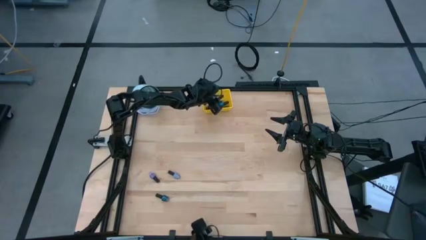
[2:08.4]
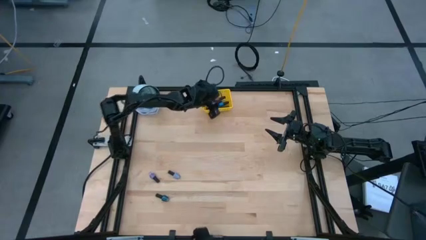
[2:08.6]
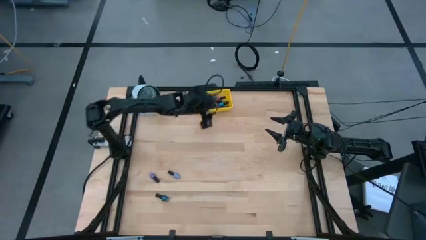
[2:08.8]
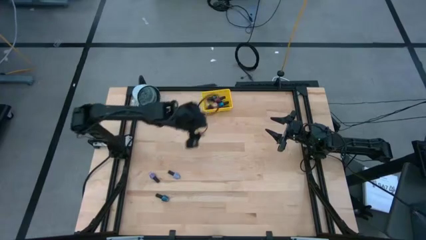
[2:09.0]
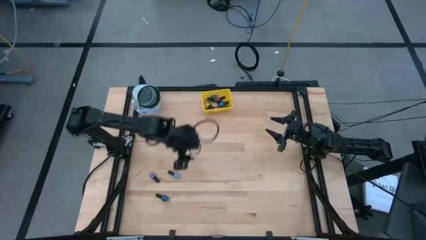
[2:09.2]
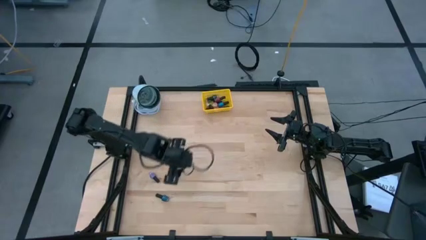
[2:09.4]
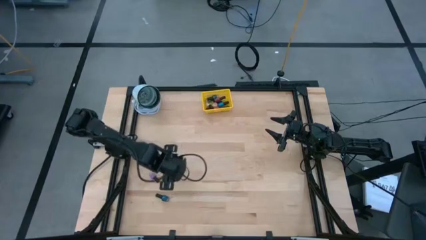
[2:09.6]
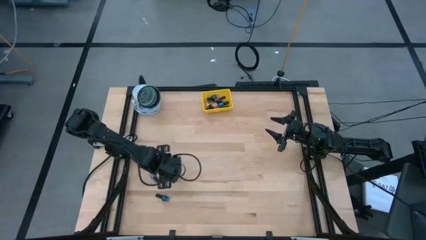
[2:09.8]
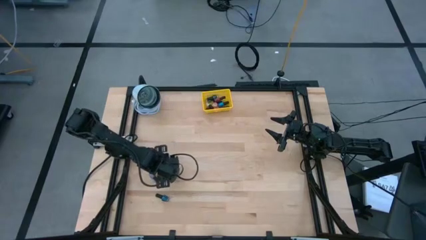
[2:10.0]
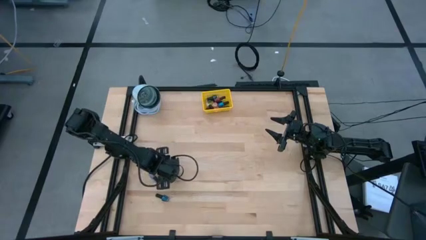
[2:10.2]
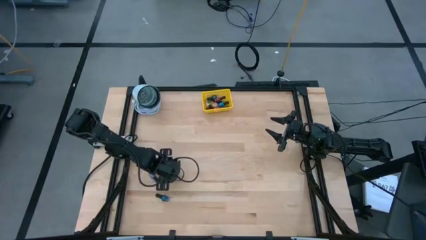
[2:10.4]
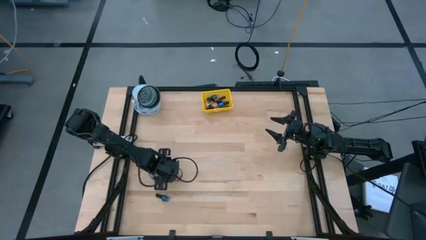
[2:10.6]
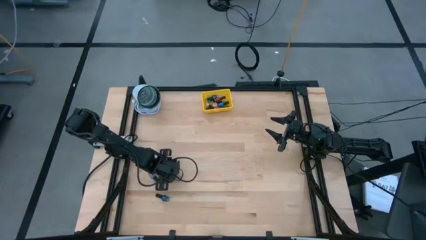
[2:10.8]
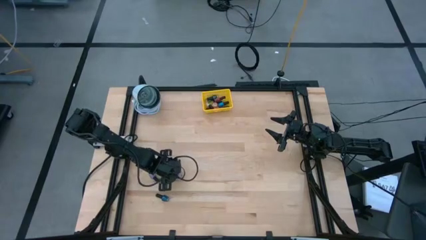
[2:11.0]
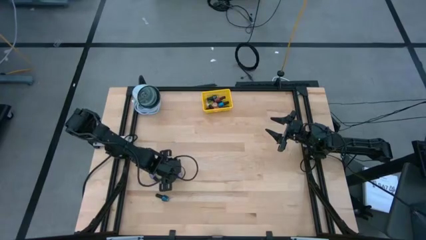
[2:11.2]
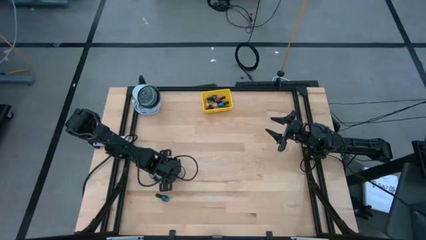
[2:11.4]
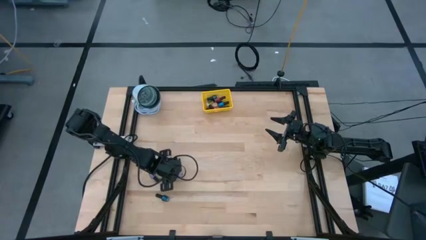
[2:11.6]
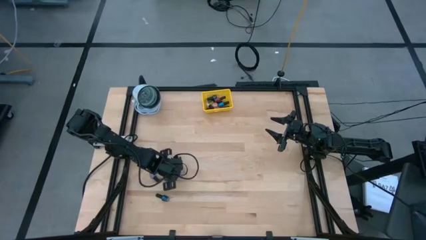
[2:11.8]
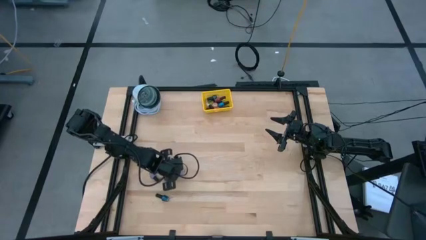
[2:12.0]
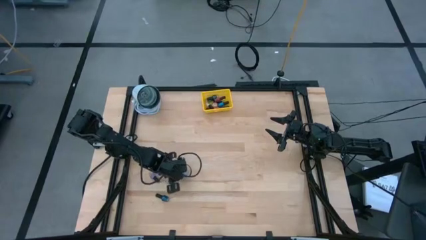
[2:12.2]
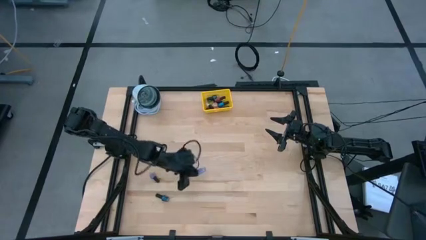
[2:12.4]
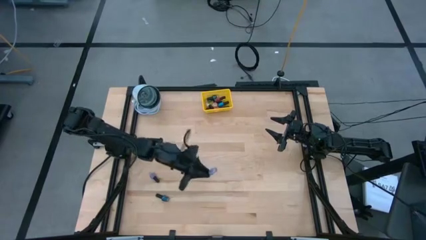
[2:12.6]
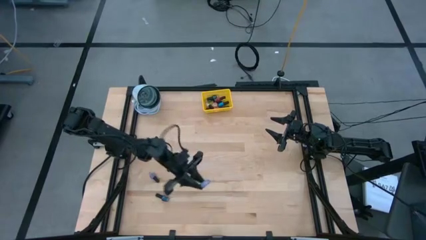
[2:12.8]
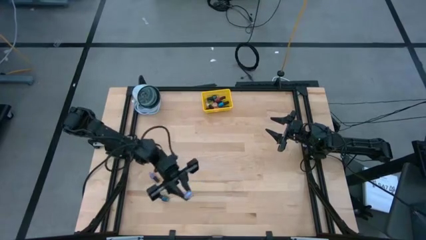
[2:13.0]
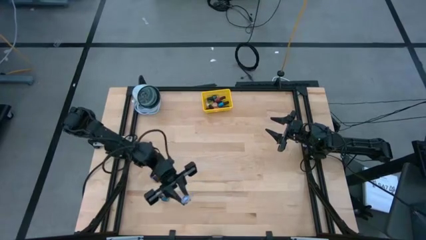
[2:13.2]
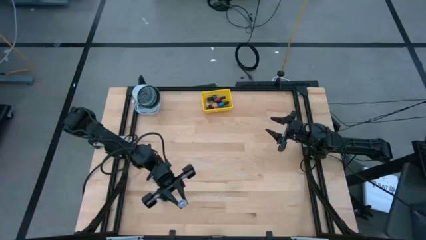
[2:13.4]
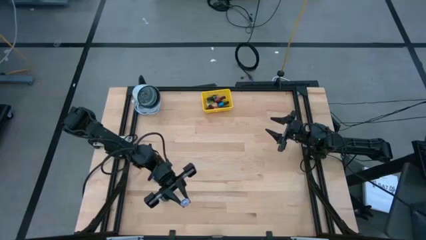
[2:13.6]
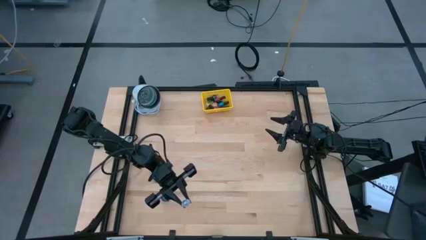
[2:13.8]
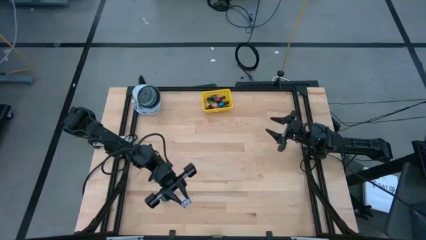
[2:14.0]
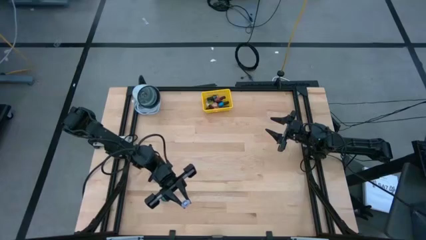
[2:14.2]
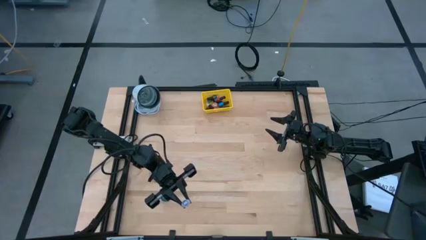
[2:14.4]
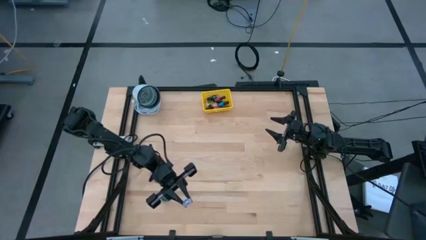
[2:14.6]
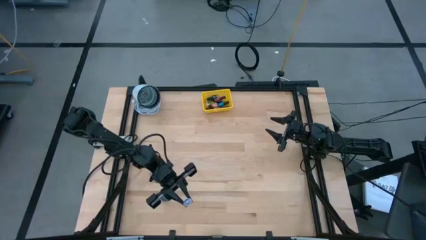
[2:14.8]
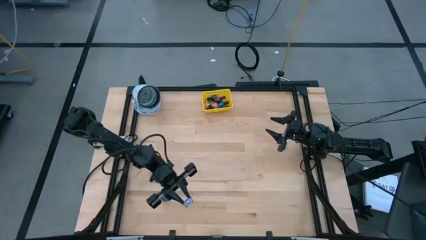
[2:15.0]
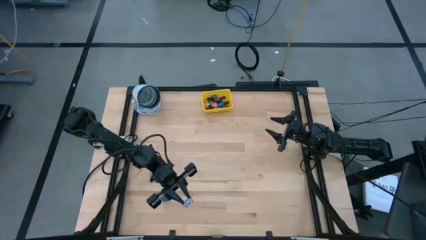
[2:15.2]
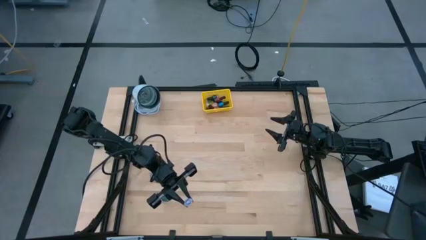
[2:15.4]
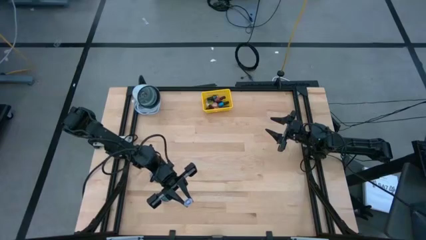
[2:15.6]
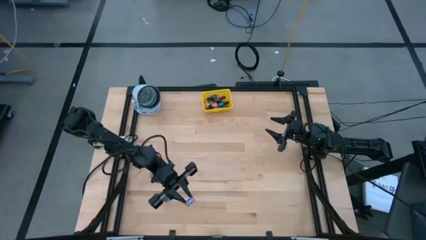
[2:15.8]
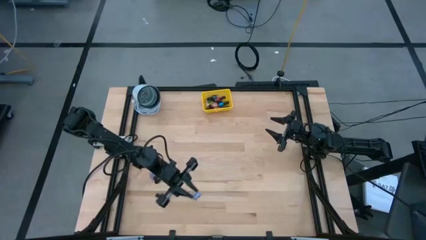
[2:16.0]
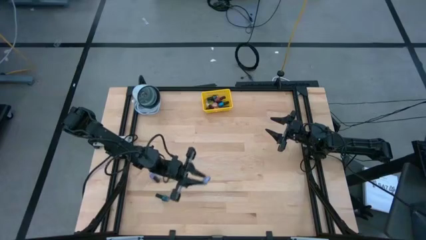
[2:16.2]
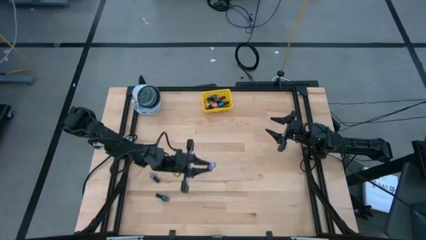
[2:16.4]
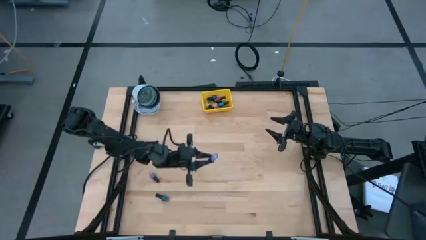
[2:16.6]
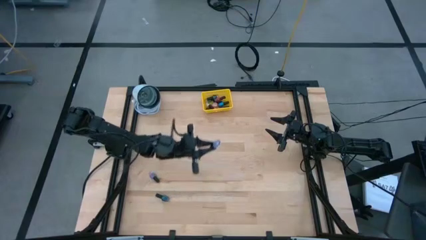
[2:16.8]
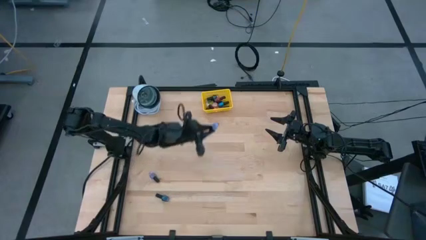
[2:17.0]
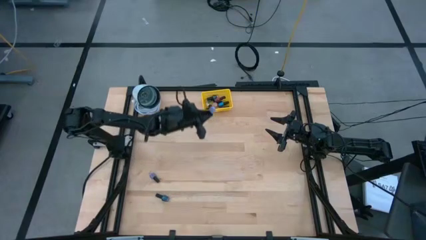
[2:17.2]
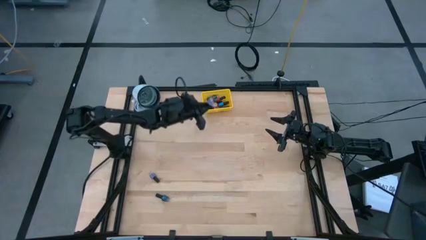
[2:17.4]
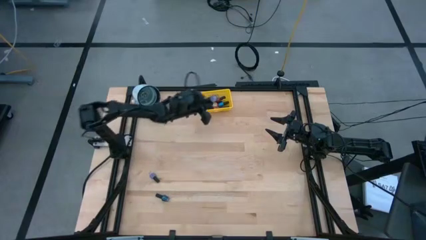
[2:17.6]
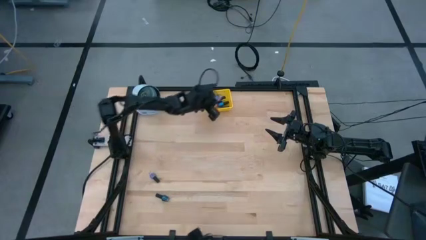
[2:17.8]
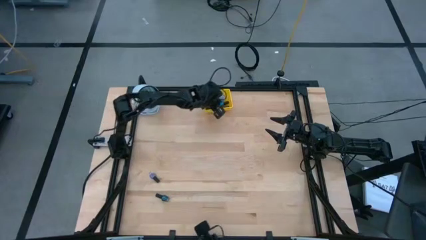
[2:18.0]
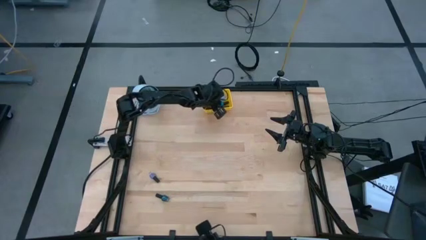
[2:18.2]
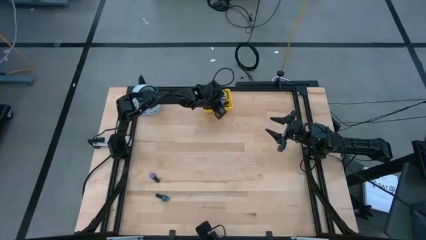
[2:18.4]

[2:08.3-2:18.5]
Task: Pick & Place Nail Polish
Put the light purple nail polish bottle into the yellow bin
